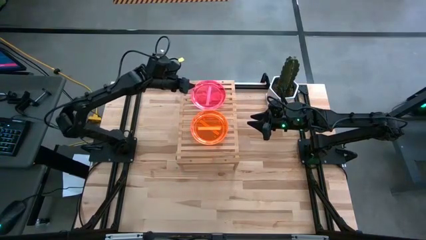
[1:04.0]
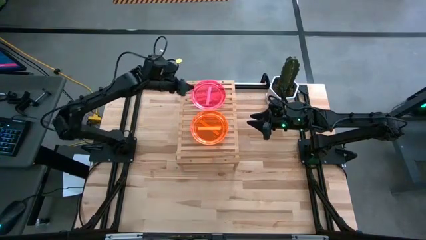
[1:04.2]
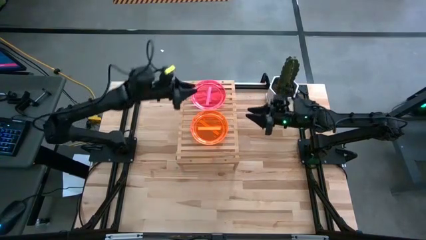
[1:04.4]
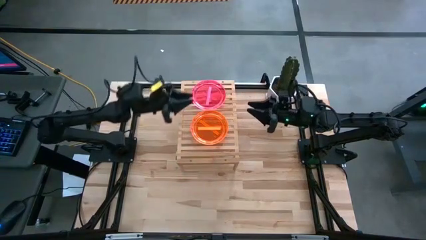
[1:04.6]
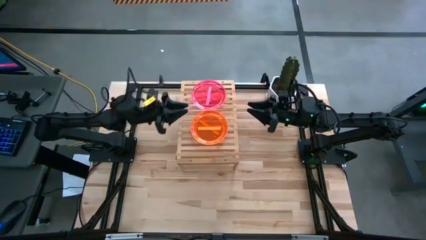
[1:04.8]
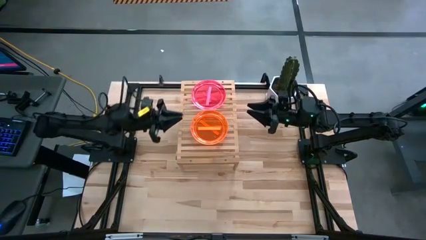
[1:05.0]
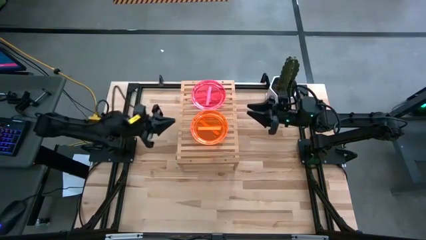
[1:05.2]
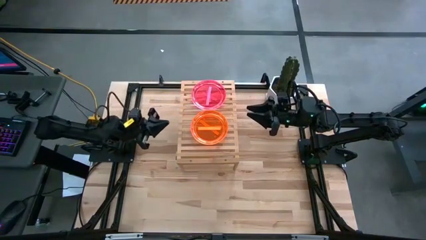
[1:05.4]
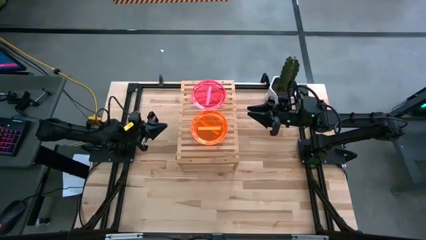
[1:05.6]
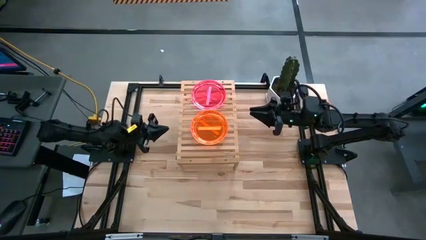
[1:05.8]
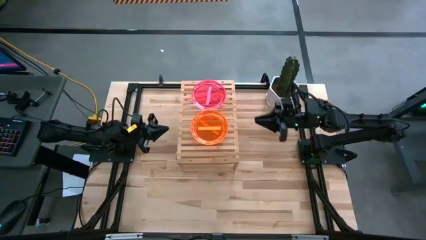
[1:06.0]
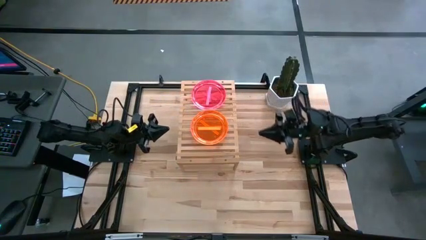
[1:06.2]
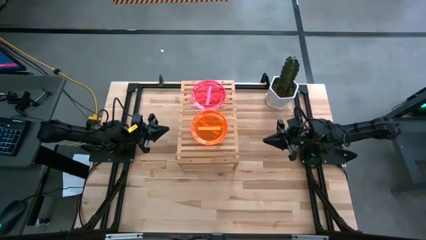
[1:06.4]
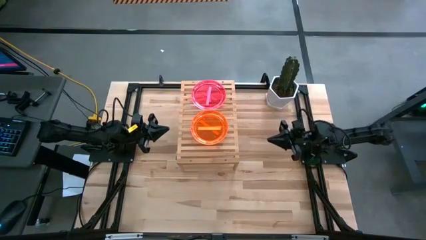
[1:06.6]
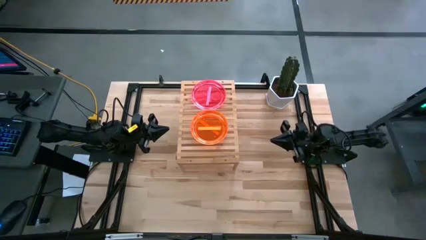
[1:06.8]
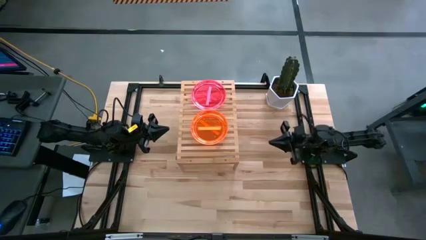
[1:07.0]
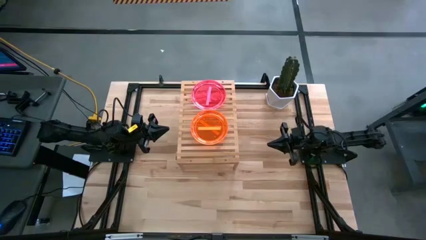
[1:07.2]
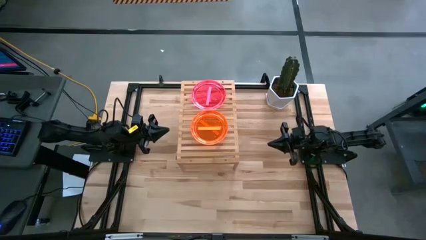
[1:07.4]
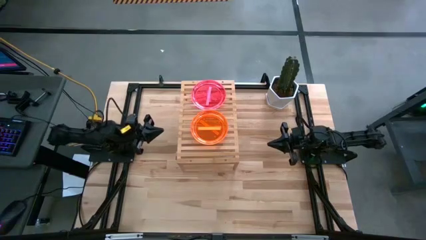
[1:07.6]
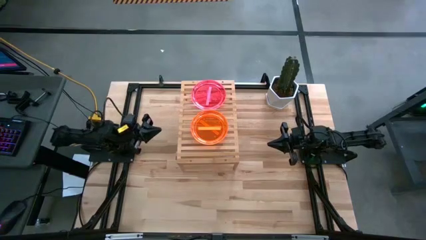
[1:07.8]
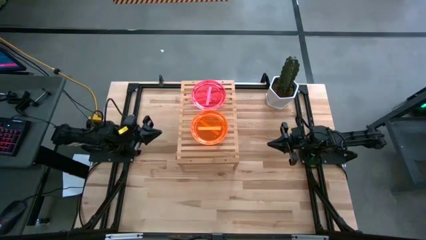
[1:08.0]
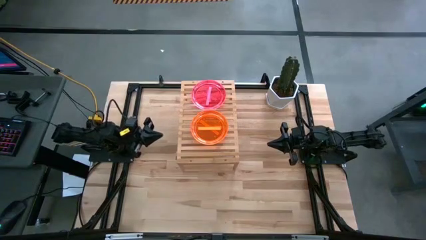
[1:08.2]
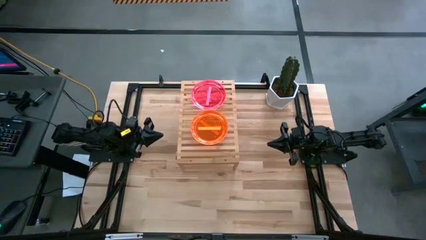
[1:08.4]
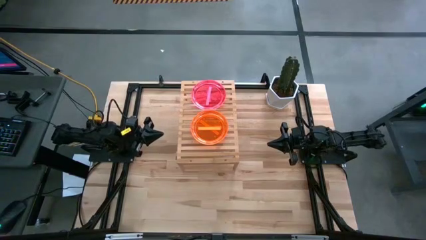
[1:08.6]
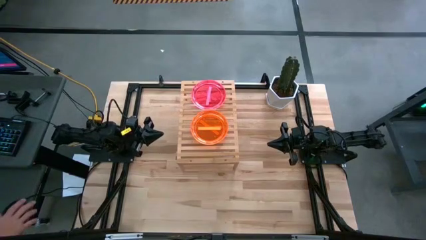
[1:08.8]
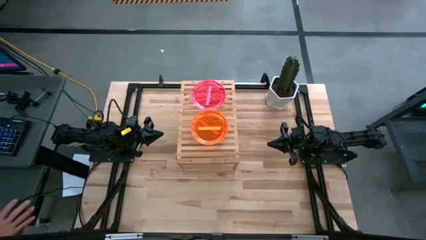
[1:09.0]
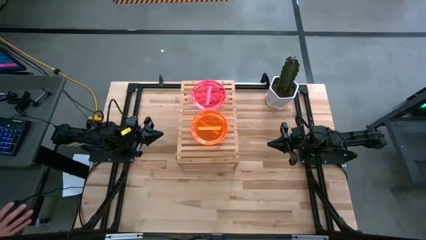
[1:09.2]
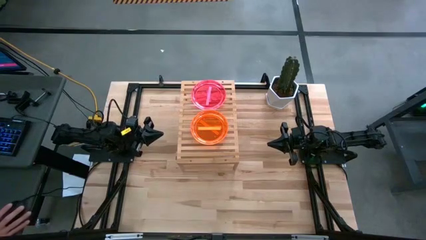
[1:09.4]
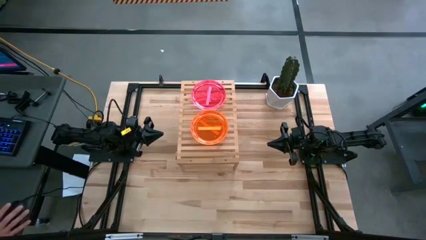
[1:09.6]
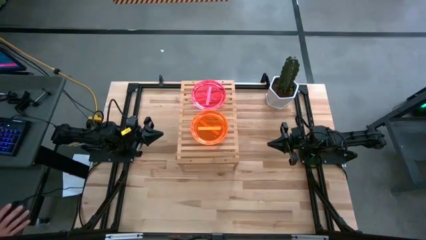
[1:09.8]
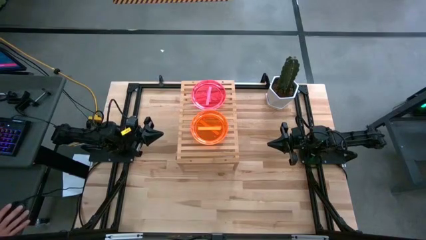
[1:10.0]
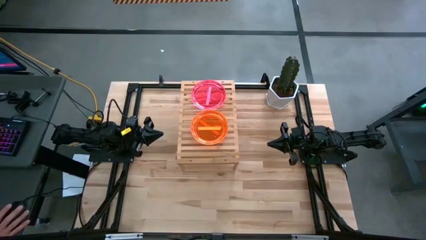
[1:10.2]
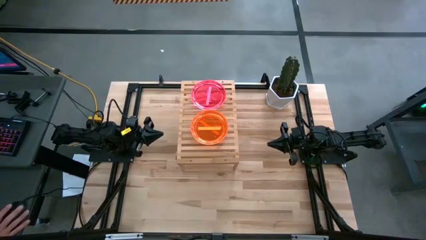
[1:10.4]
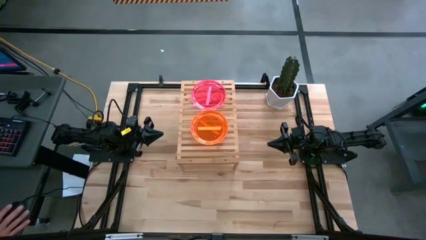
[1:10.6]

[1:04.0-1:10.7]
Task: Place and stack plates onto a shelf
Return to Home Position

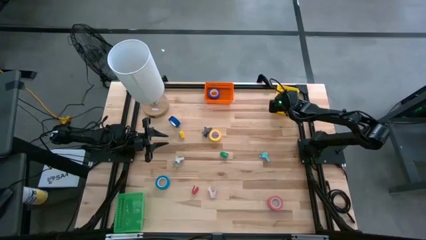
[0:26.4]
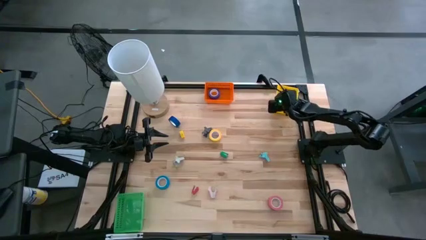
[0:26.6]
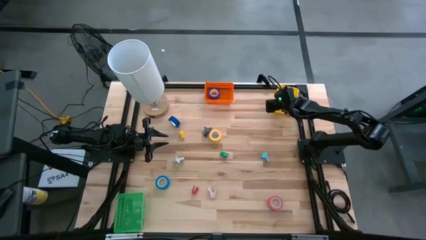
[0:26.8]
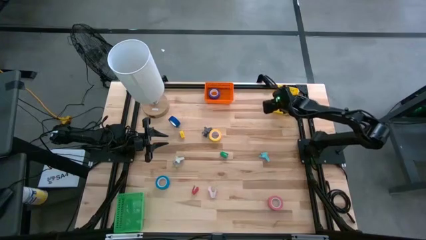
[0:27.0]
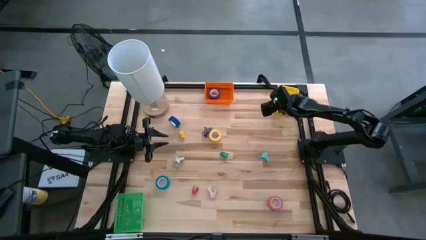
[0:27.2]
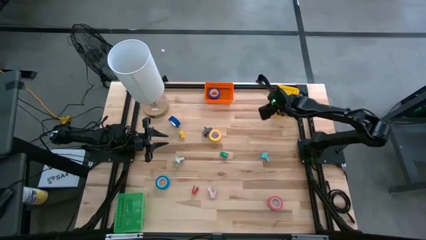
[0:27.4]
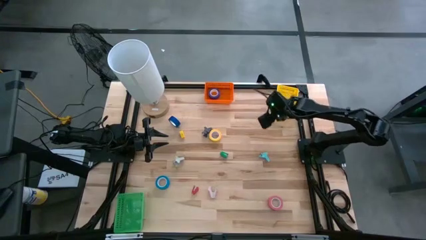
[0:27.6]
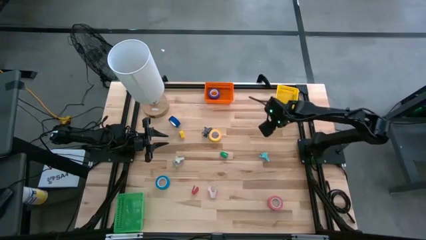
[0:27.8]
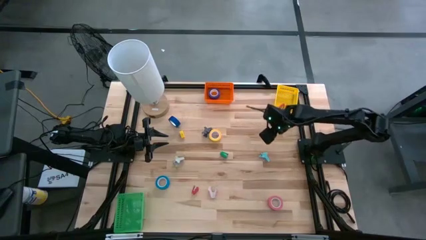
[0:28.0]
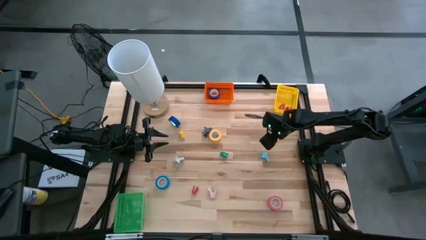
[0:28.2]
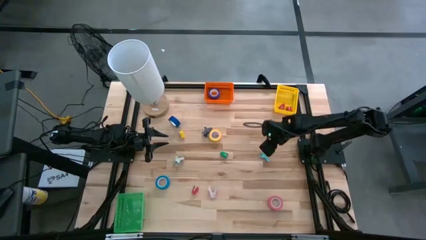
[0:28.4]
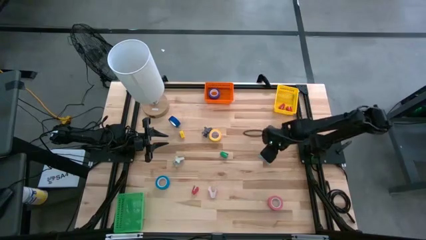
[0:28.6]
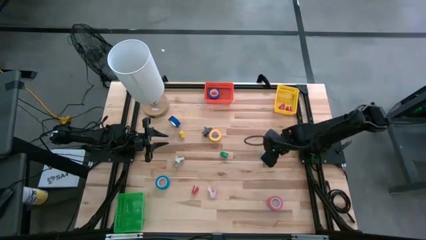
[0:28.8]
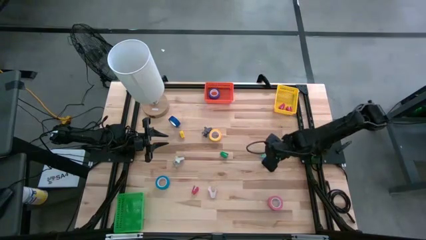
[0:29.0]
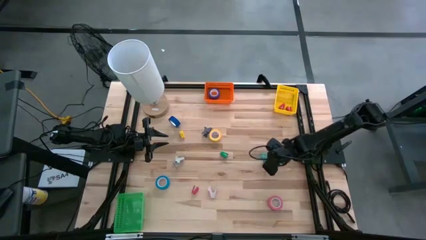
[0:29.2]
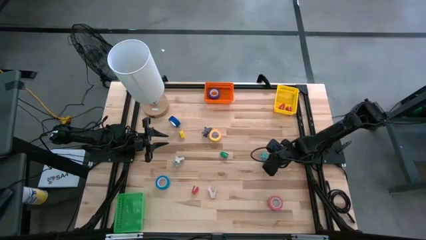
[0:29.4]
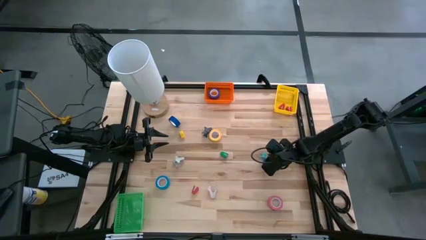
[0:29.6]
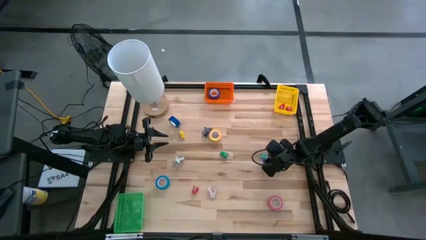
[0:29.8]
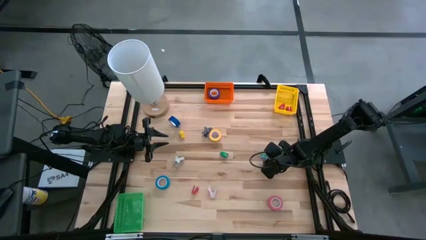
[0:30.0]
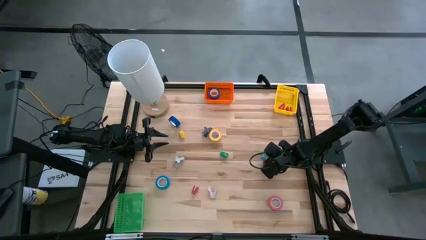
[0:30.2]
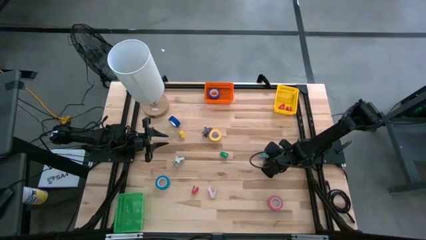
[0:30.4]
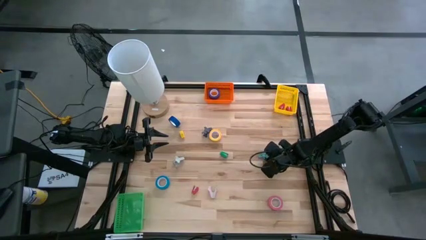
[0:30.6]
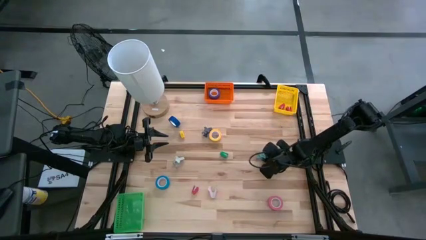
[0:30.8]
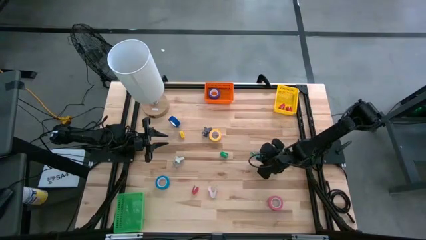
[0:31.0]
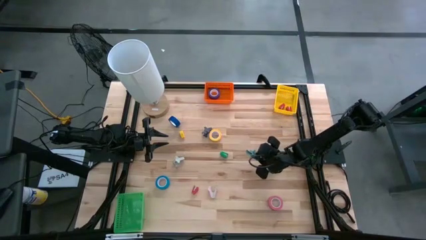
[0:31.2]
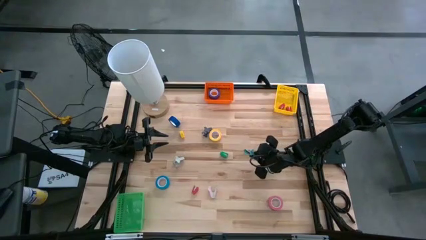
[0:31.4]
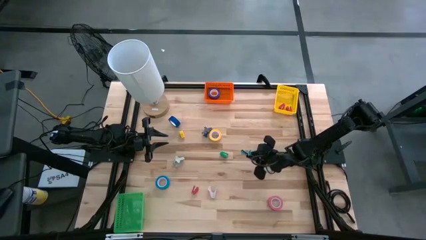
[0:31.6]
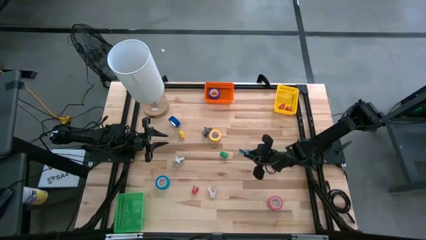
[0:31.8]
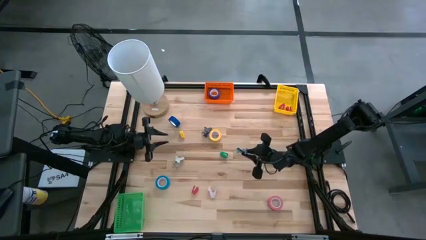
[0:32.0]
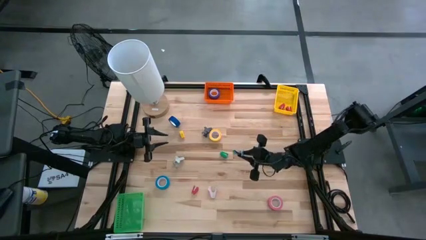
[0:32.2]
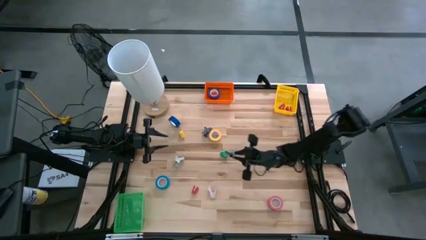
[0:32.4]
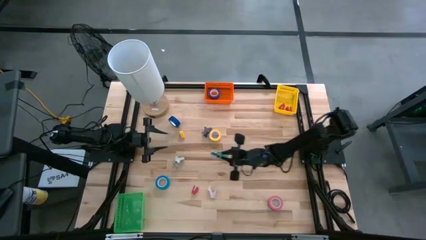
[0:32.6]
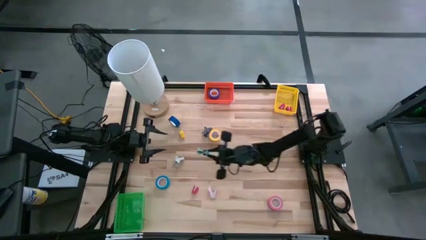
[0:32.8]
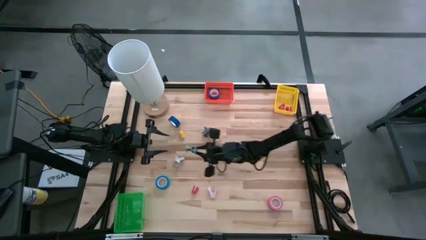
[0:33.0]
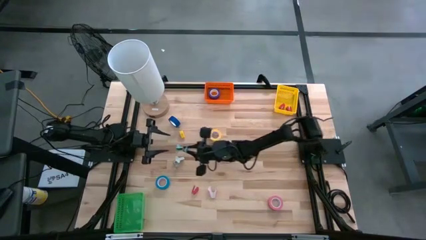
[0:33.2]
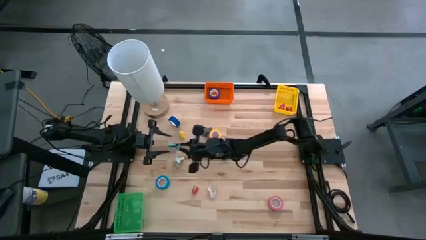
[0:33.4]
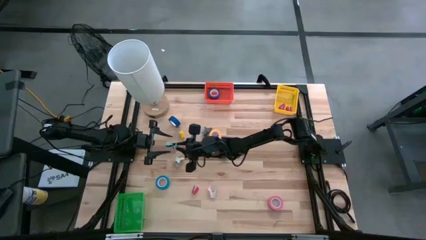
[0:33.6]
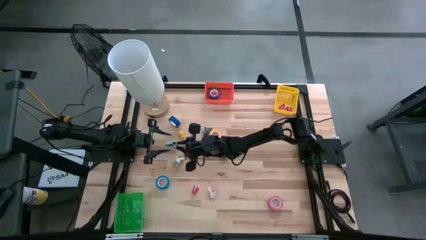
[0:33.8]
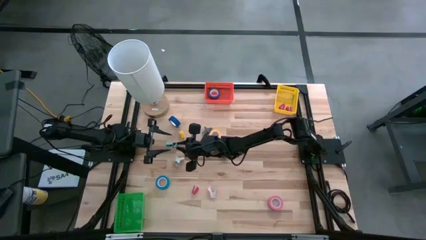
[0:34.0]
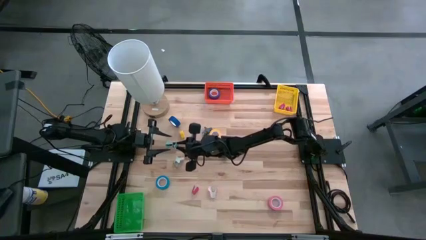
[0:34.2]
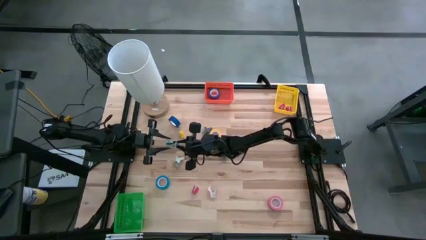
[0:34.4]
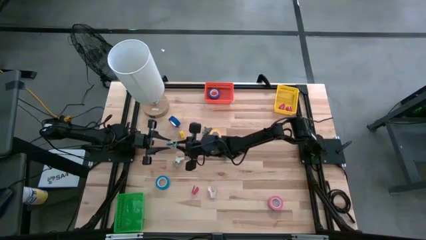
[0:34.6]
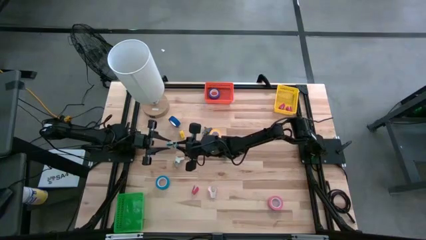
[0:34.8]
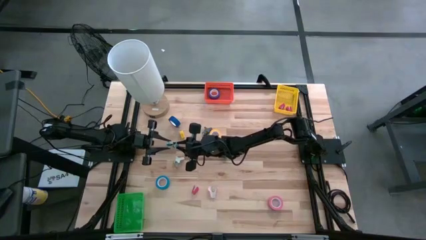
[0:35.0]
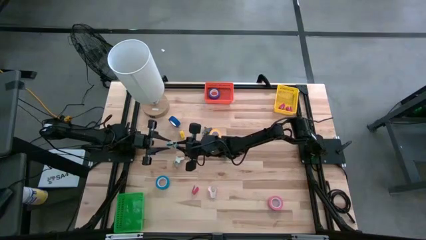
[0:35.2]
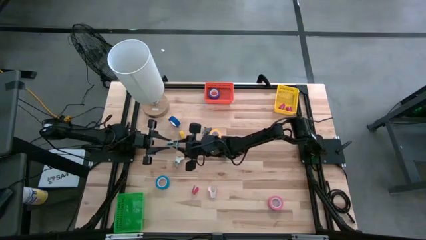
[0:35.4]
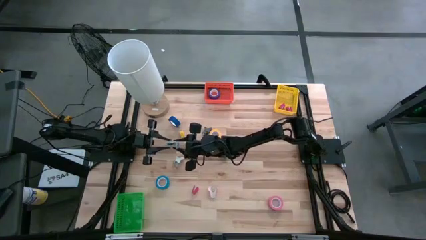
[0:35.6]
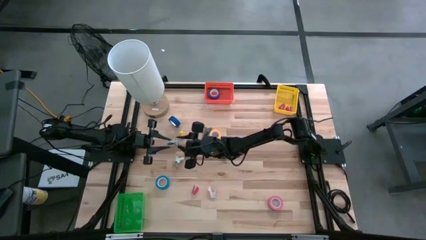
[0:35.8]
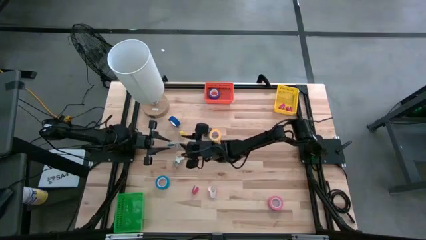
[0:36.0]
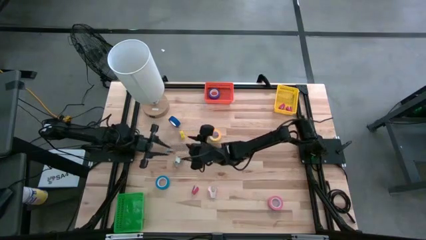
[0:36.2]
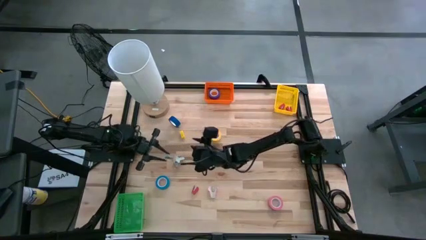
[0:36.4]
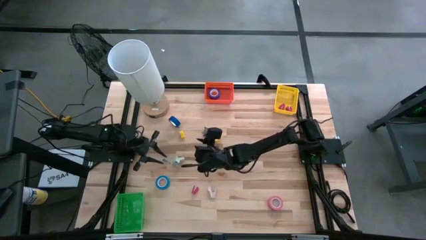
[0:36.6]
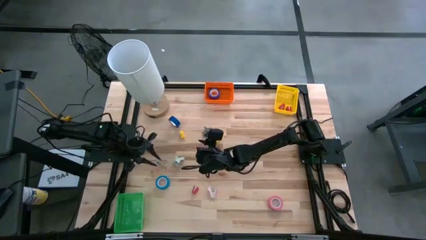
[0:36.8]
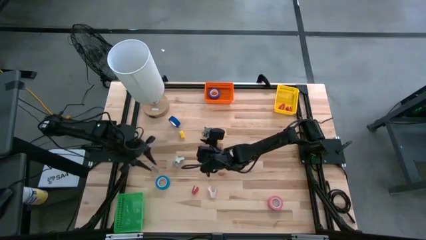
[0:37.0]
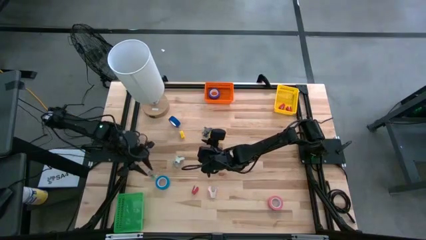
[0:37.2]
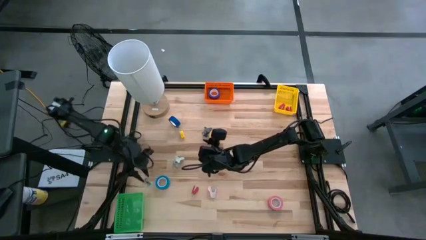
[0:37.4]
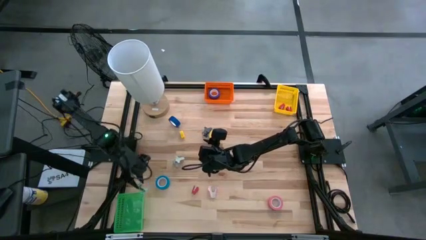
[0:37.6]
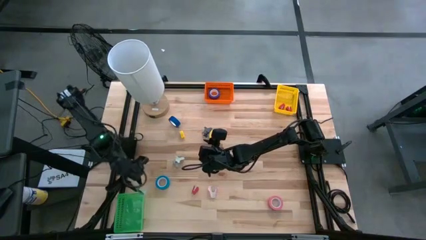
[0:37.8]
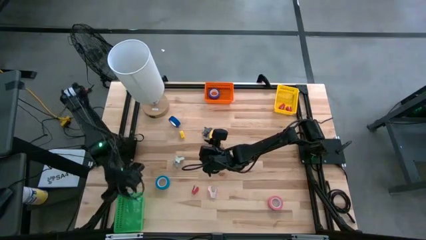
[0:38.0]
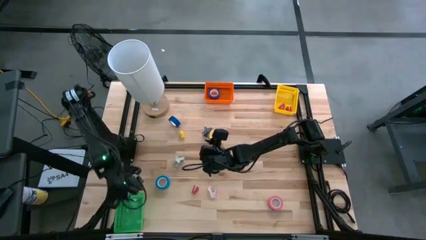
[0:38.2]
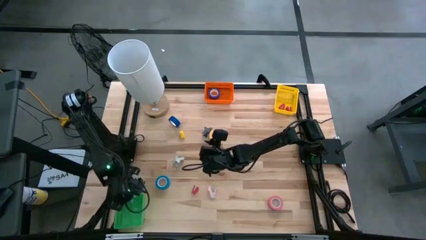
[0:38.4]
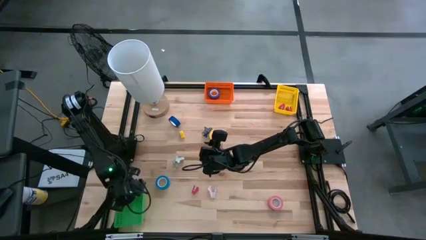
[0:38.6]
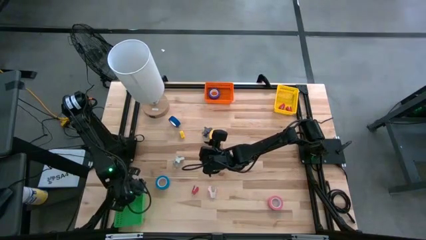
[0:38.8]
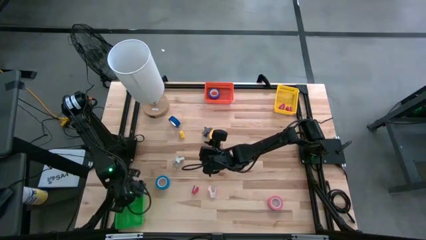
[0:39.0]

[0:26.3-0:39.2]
Task: Pick and place Stapler, Stapler remover, tape
Put the light blue staple remover into the green bin
